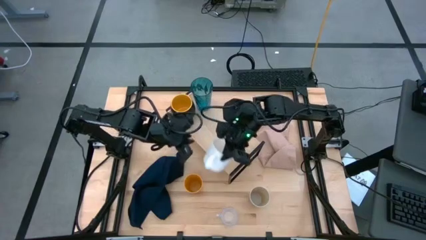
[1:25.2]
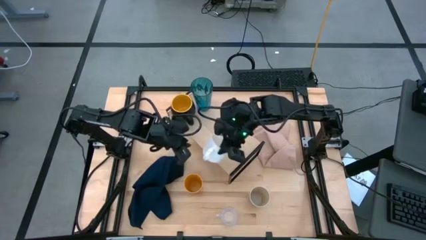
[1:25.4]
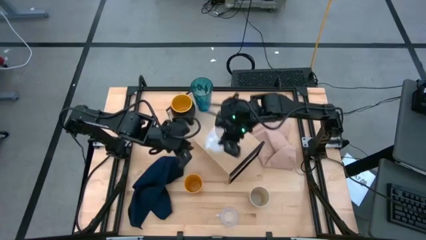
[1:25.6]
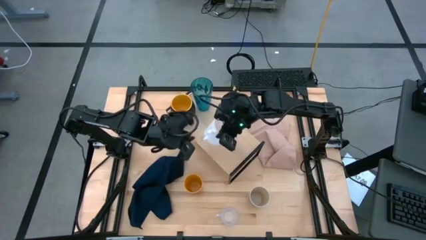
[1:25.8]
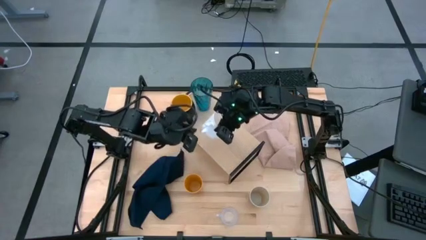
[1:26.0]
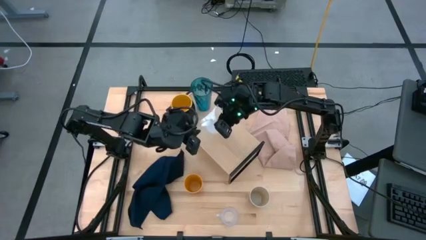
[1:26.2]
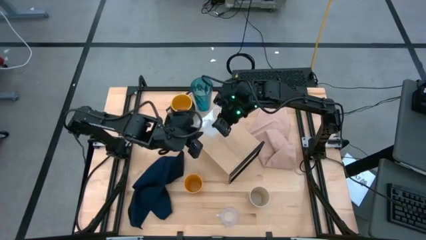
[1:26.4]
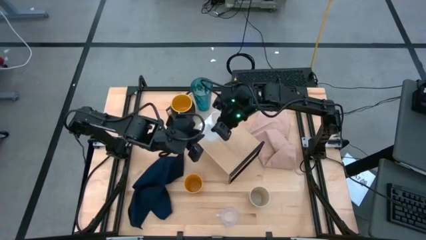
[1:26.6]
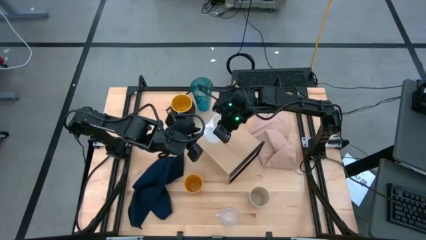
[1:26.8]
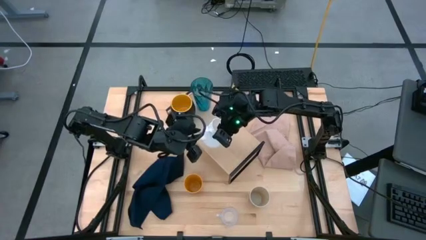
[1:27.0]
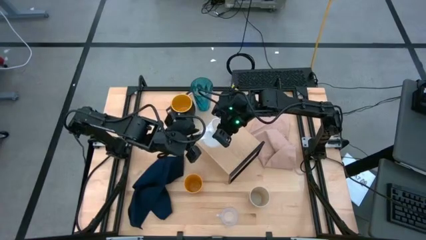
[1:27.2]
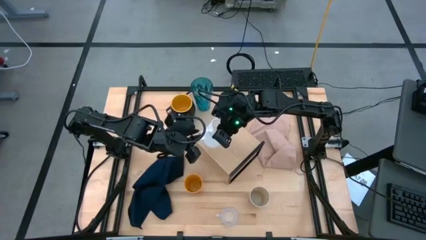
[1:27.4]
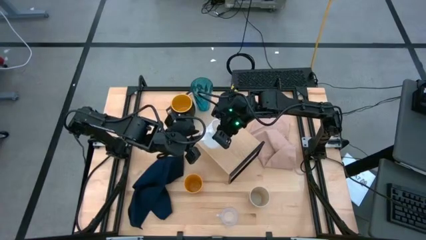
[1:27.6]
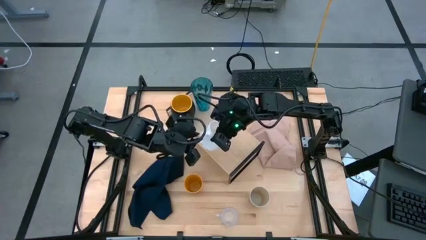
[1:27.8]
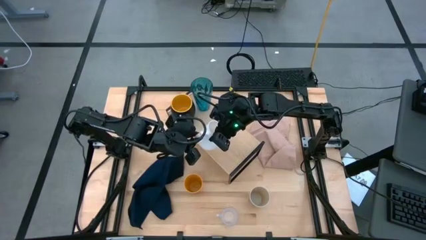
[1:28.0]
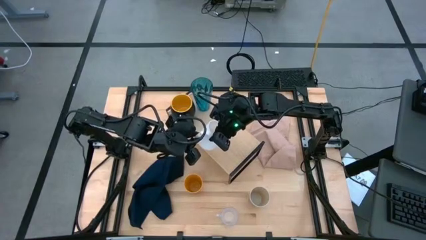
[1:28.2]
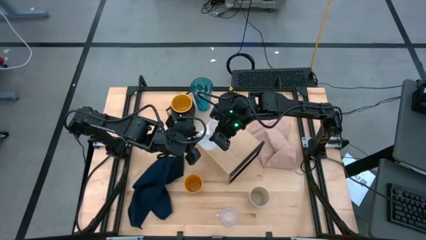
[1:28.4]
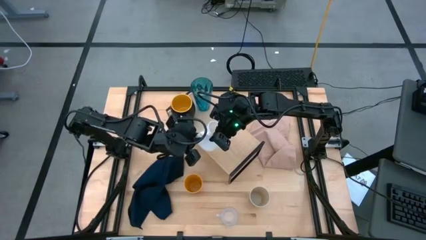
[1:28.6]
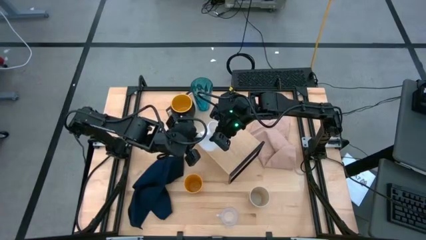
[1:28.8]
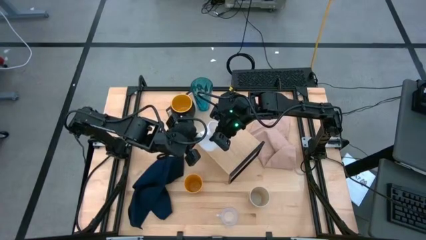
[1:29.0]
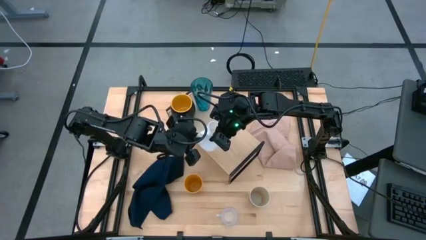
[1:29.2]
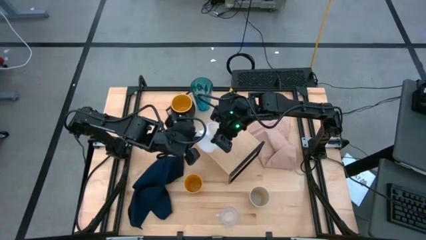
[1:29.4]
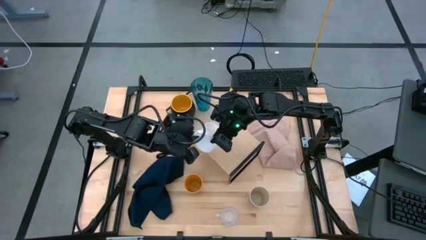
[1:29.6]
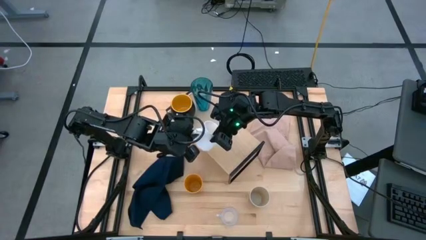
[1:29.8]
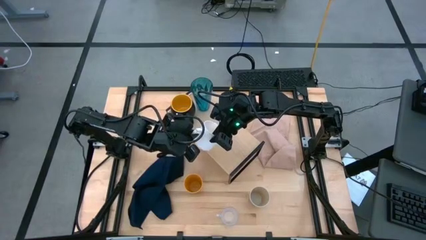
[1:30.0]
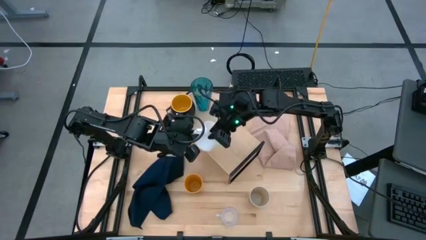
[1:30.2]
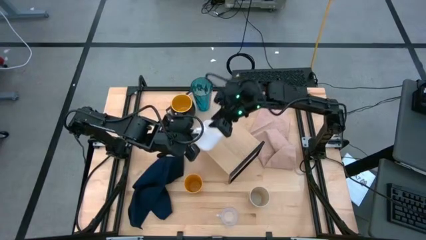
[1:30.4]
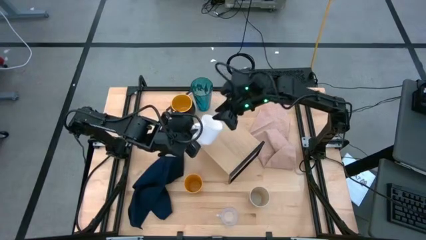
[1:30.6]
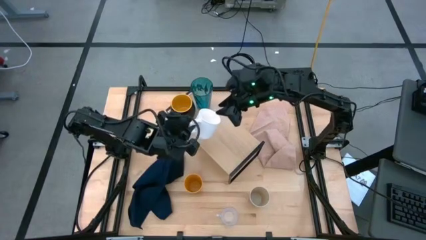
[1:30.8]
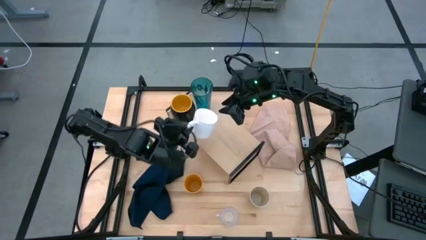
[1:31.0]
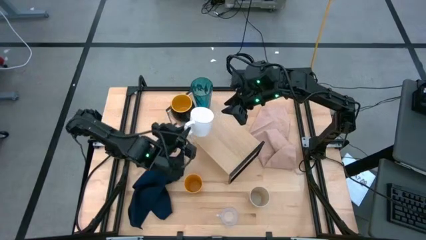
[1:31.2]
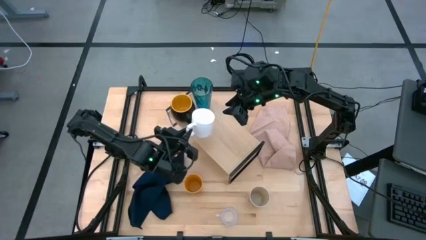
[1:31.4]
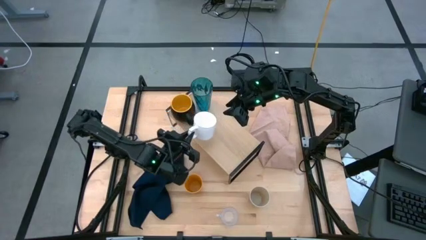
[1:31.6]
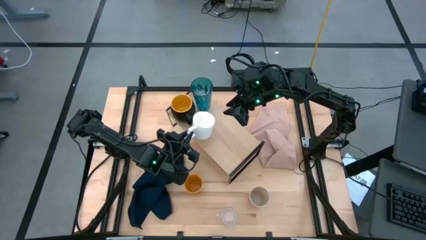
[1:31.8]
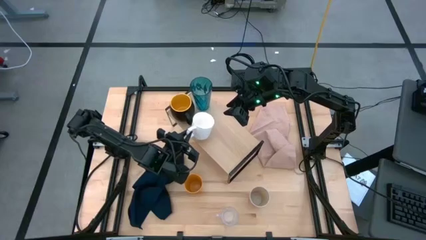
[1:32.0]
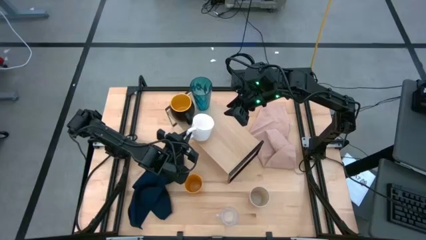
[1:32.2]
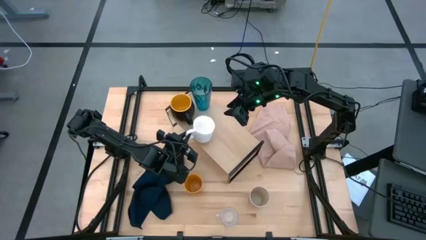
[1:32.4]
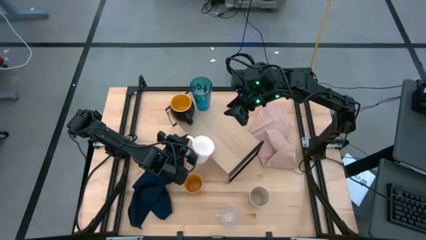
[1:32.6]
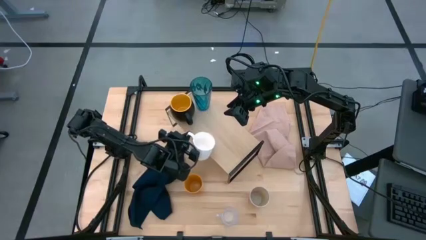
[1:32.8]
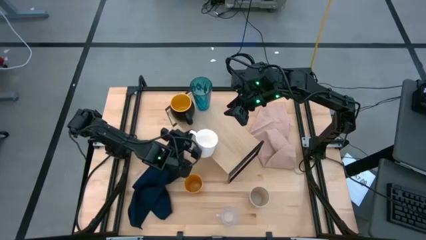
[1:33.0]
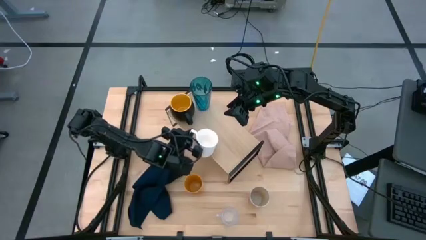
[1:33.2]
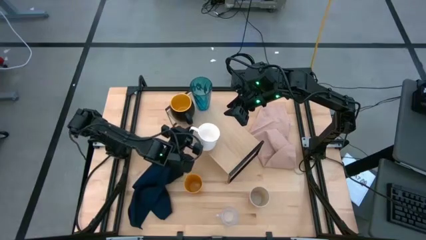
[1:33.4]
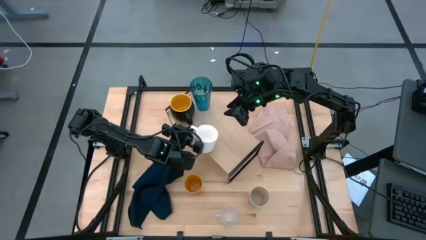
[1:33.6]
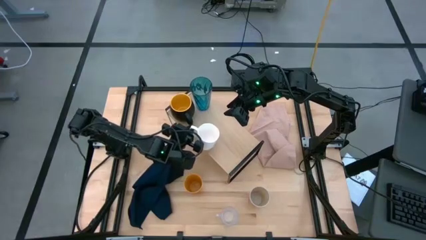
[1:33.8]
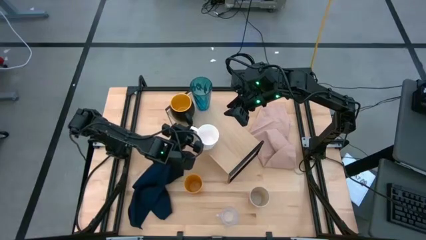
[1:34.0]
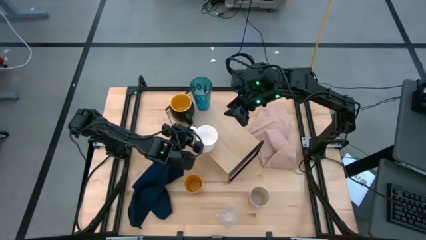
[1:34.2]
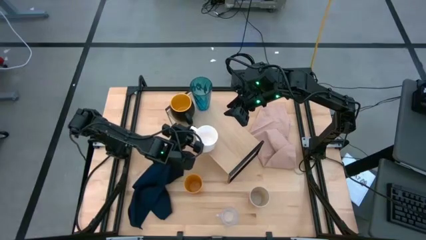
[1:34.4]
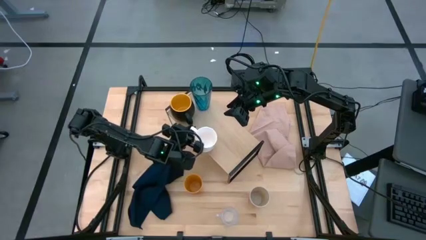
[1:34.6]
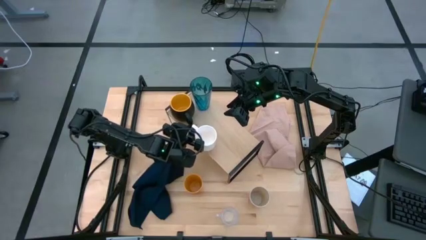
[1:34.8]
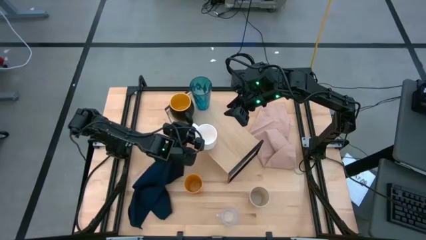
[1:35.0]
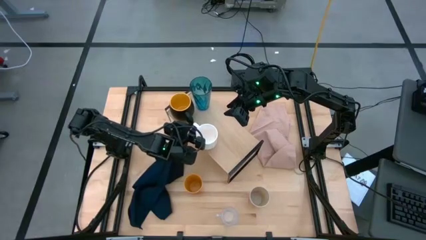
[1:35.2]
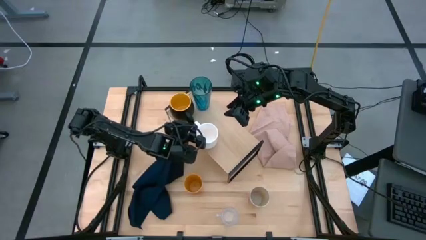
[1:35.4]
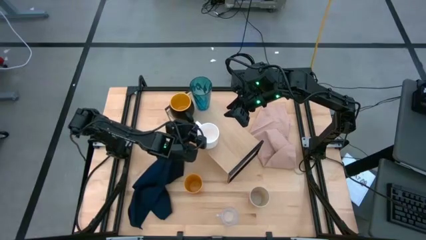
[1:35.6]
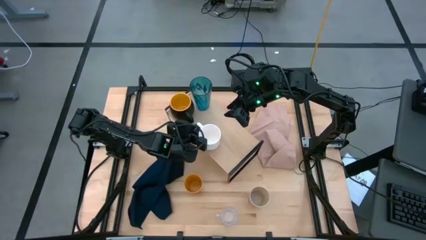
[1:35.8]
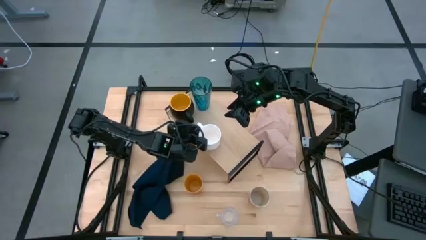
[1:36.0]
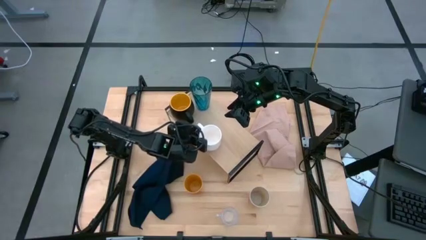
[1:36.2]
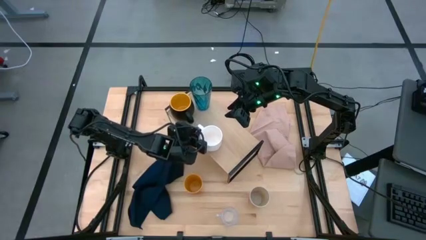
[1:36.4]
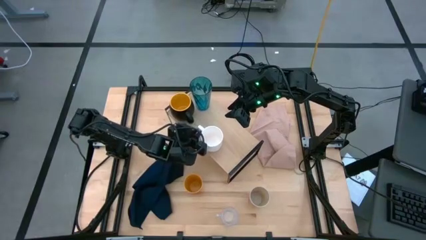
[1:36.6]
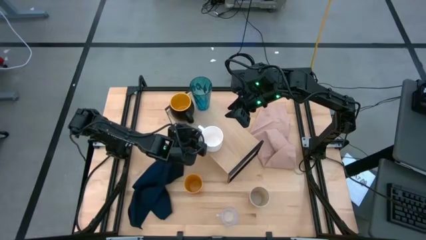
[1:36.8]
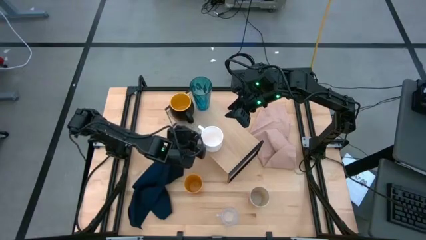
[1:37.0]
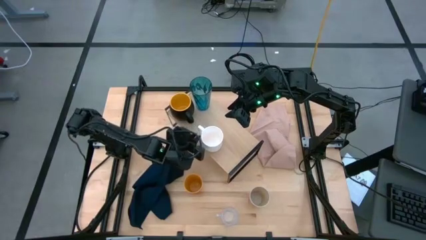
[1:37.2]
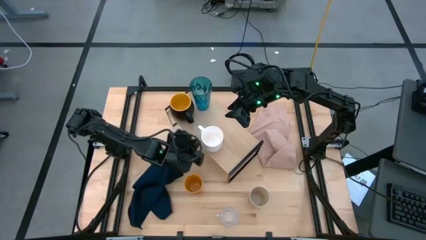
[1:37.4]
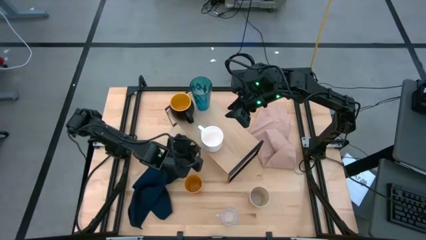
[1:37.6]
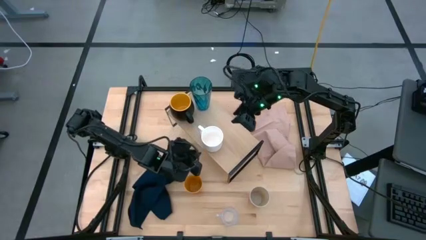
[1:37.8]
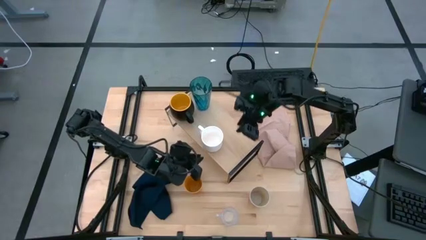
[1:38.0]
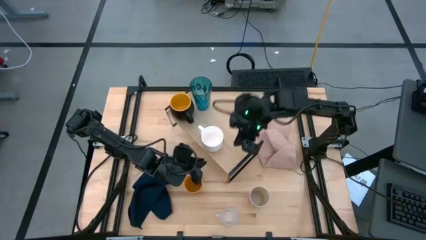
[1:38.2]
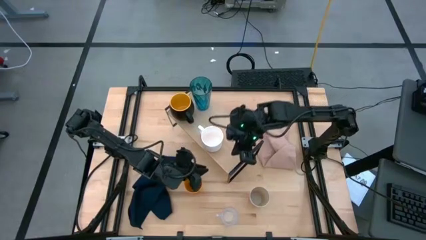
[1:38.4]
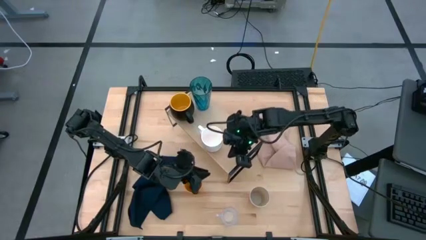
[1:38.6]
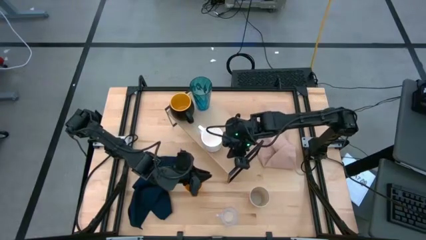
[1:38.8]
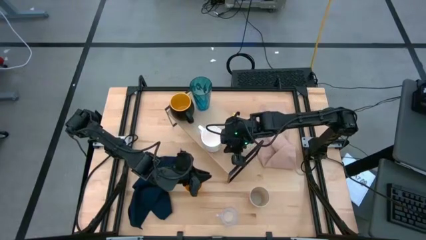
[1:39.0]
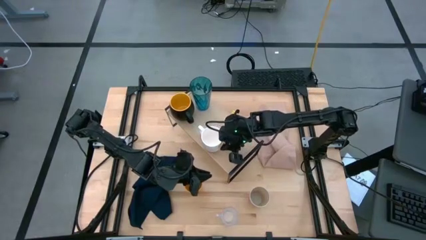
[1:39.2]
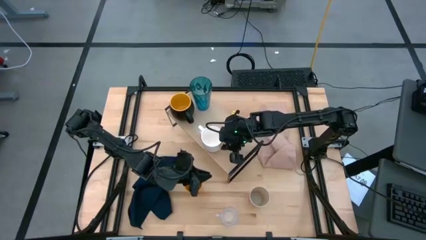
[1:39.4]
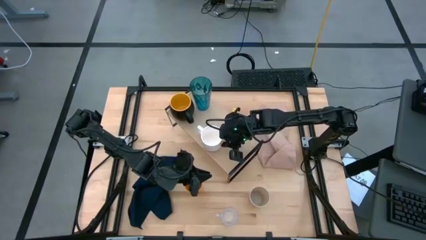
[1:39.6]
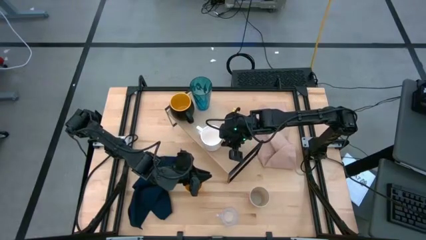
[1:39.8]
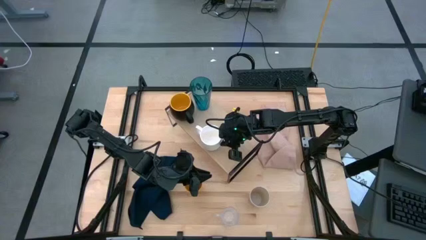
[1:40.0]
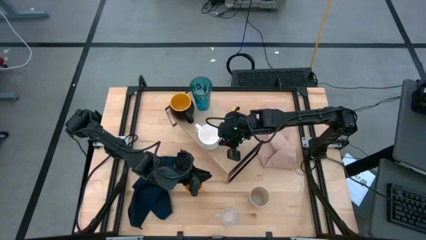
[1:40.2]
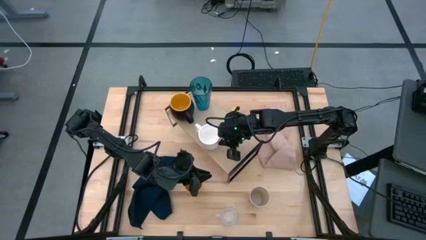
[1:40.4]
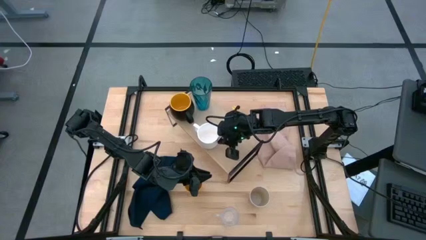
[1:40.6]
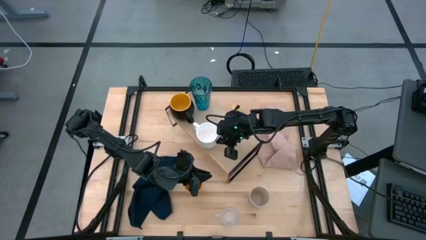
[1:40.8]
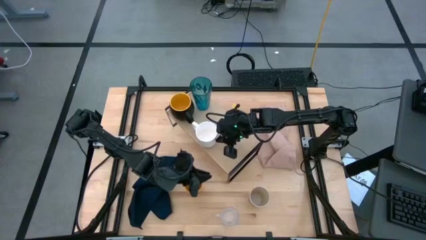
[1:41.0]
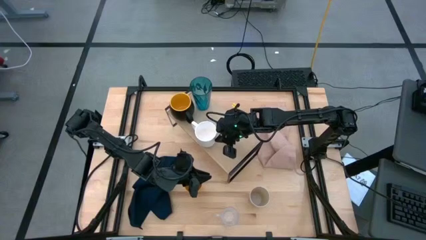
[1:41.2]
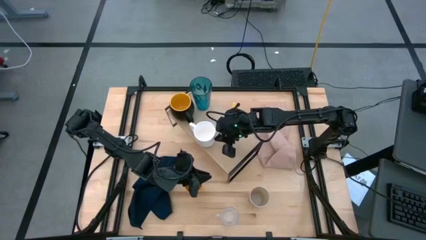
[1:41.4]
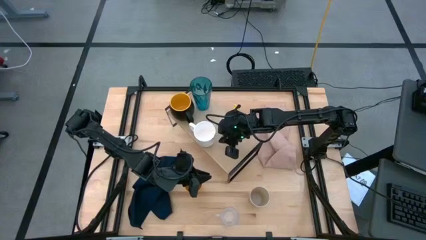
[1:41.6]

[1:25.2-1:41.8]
Task: Stack small to large cups/mugs on shelf
Put the white mug on the shelf
